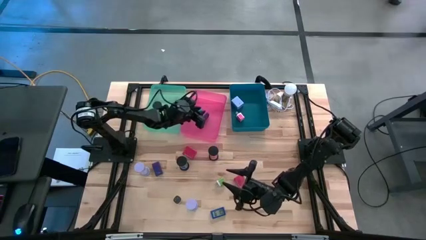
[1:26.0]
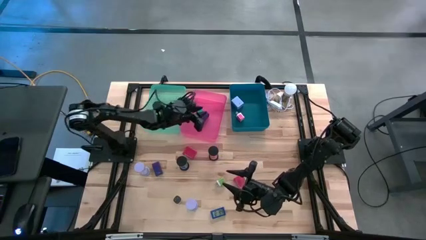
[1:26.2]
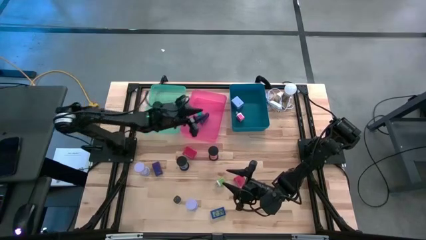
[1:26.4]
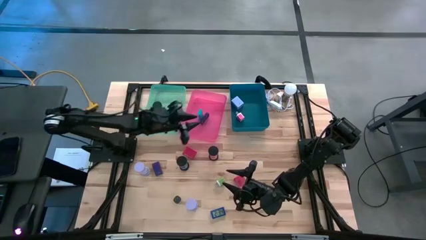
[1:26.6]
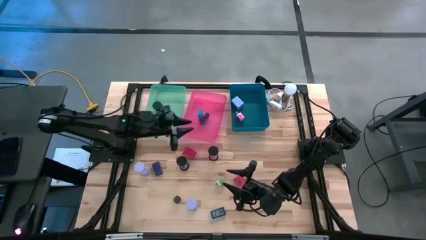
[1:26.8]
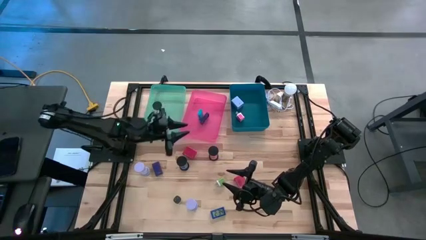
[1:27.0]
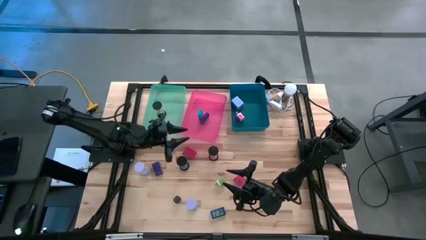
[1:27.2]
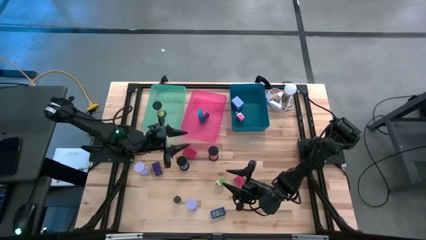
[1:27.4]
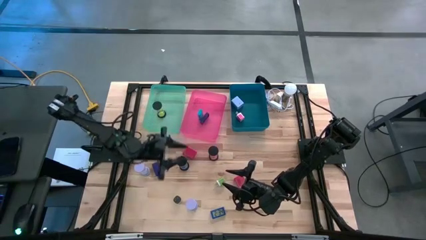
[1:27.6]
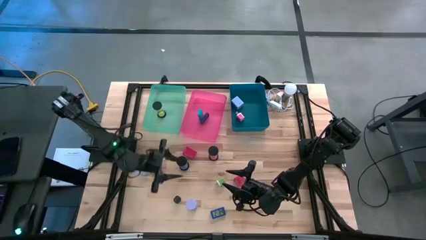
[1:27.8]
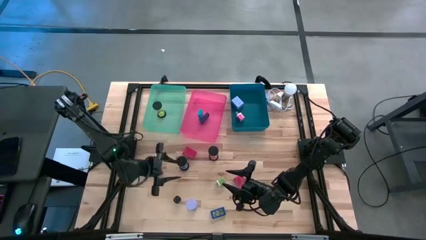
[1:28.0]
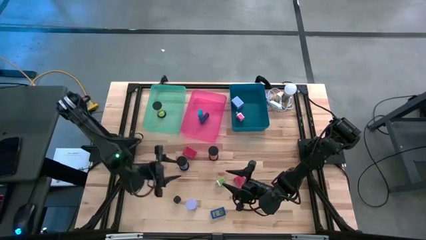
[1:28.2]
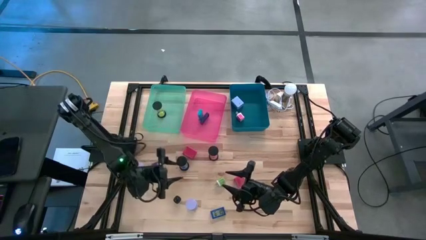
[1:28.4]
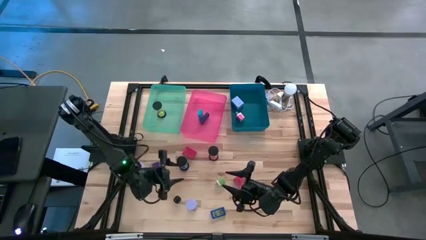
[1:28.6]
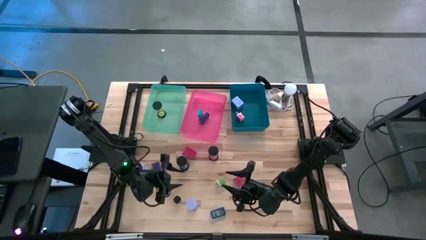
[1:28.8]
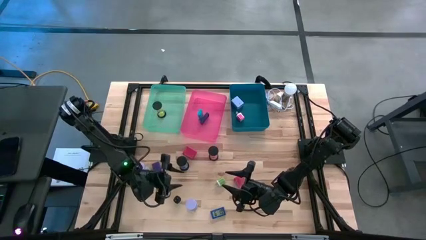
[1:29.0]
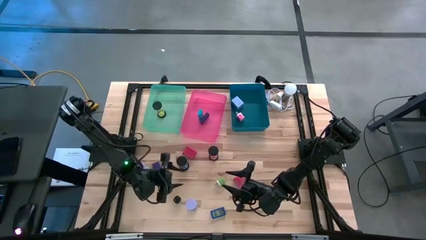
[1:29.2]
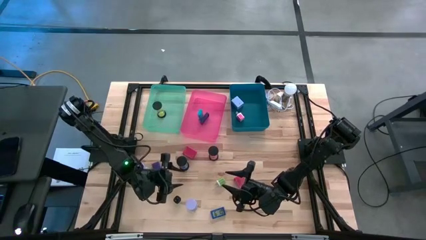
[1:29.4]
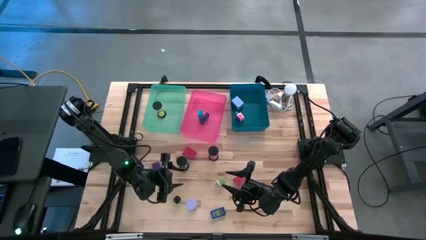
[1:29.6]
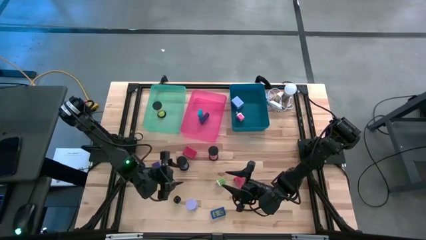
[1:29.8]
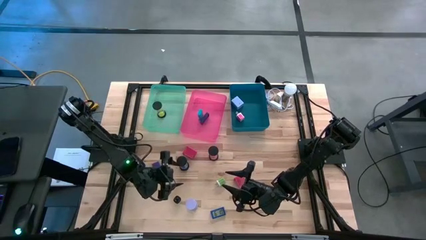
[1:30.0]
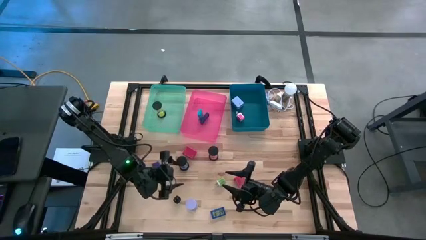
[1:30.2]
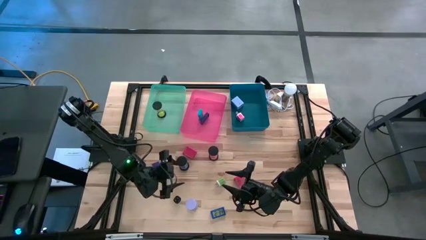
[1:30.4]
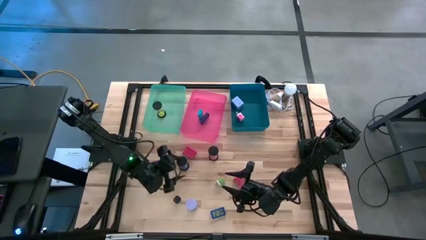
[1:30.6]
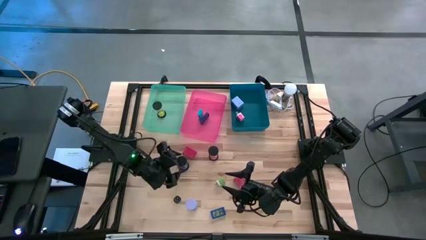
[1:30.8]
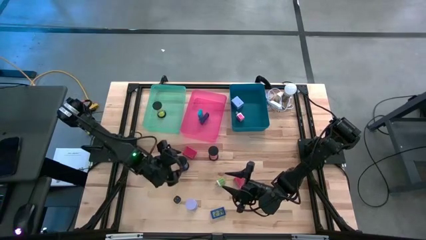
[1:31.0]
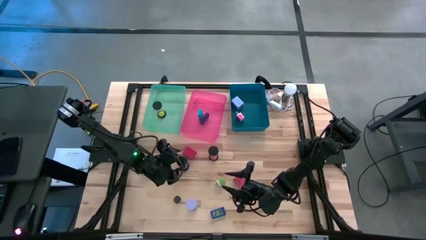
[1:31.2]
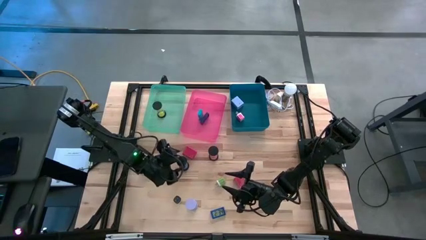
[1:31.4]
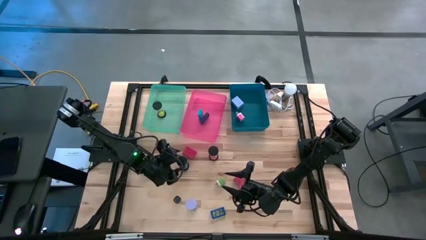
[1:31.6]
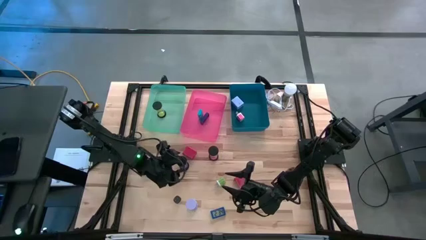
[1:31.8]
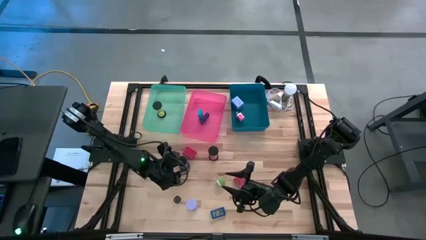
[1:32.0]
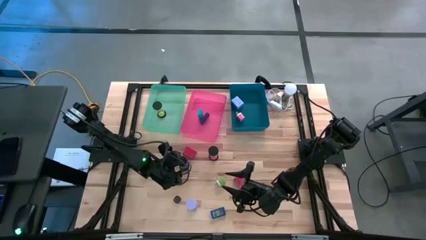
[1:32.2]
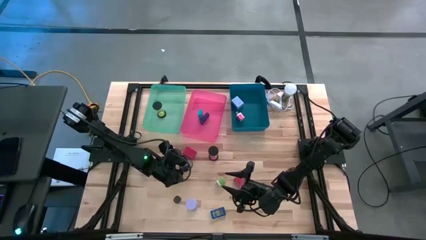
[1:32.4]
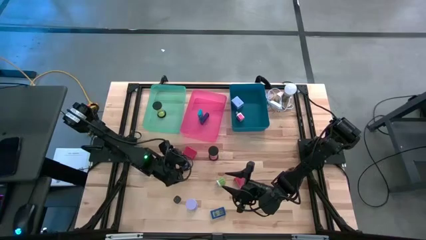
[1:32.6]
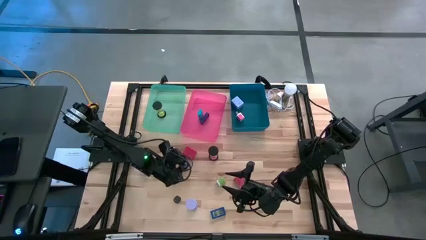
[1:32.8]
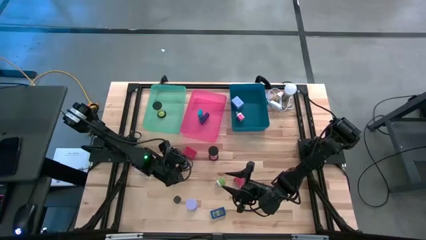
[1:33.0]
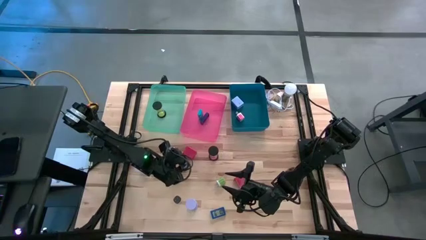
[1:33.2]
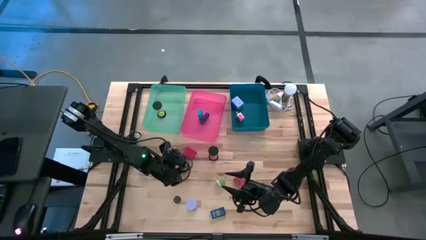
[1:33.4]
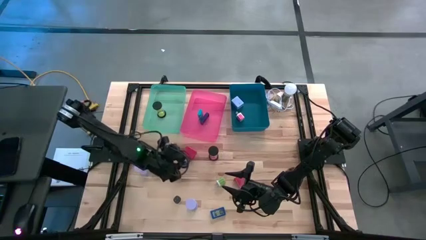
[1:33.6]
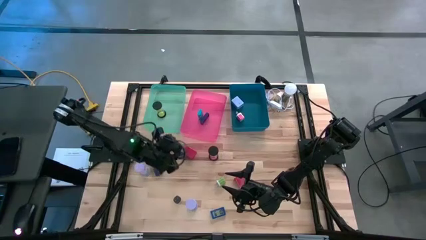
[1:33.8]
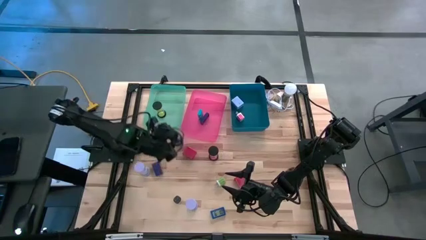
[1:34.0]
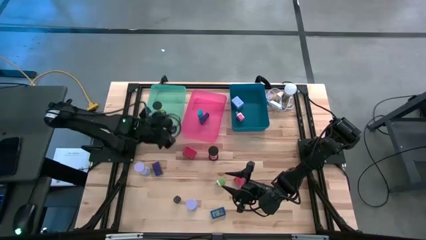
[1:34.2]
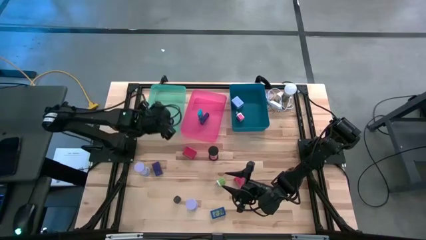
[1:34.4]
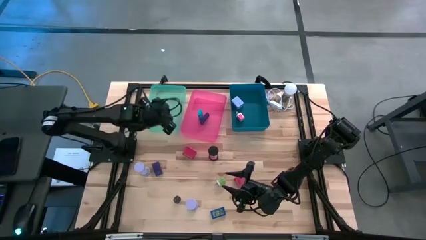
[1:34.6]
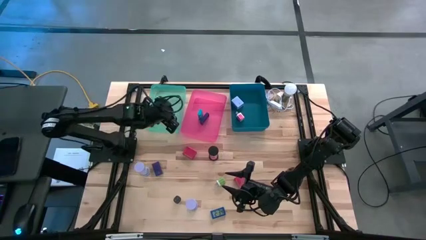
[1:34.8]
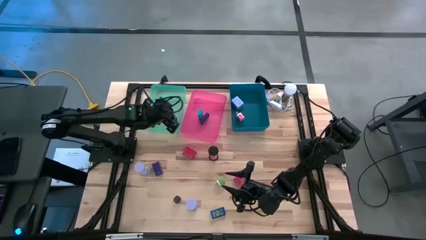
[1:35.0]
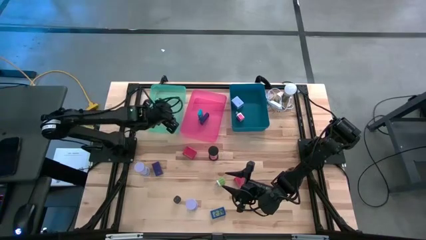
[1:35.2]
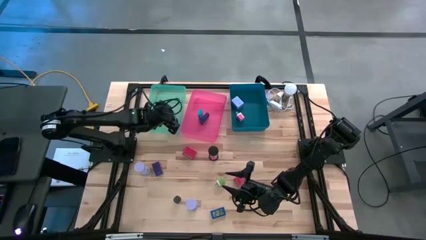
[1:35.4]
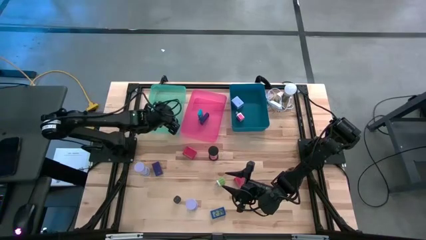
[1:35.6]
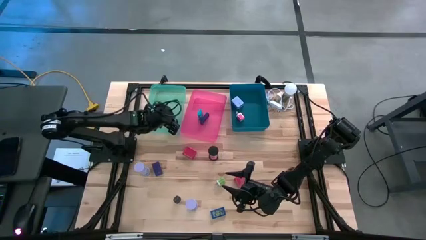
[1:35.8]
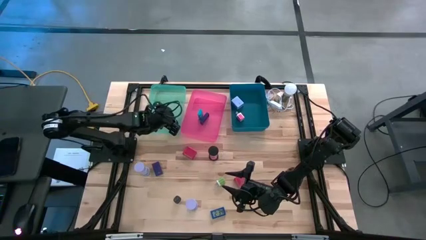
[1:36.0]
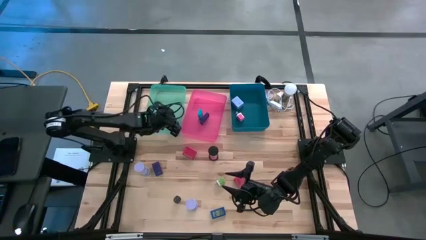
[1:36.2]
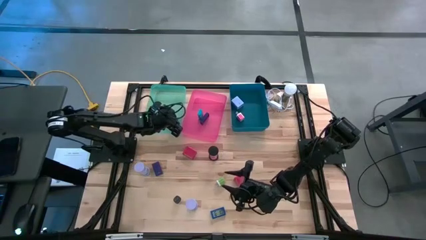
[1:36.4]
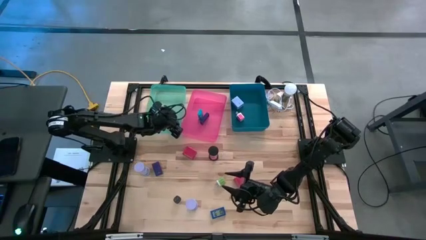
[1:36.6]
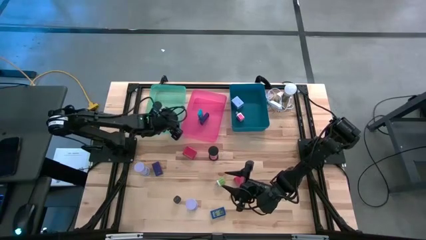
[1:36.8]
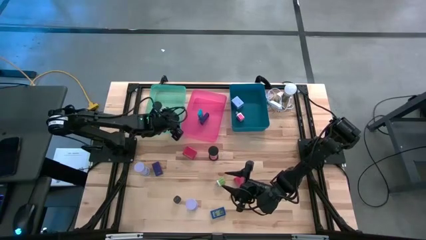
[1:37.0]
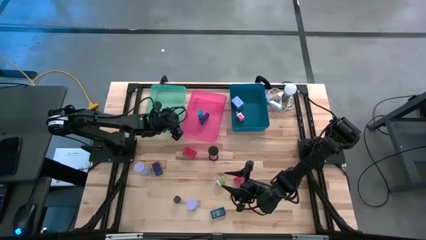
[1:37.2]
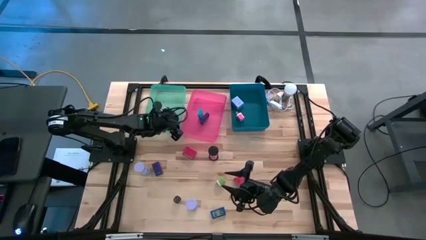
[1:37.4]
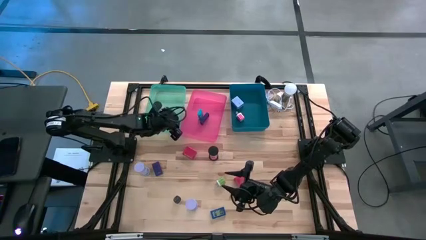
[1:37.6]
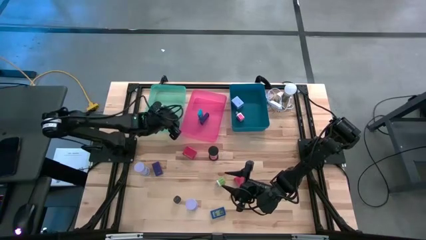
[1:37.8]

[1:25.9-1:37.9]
Task: Pick & Place Office items
Put the blue hourglass into the green bin
